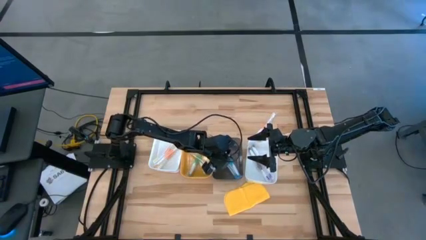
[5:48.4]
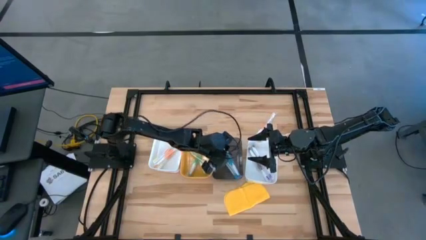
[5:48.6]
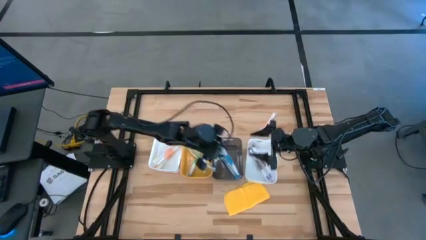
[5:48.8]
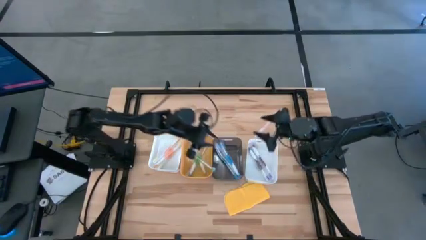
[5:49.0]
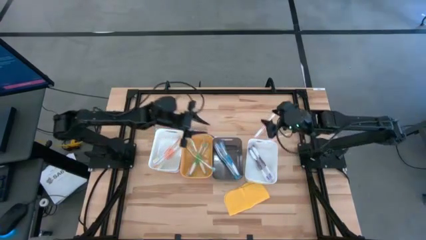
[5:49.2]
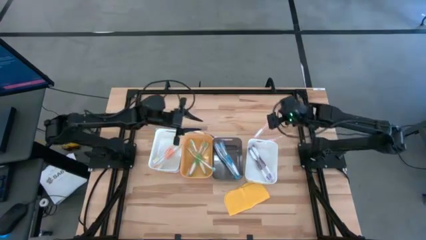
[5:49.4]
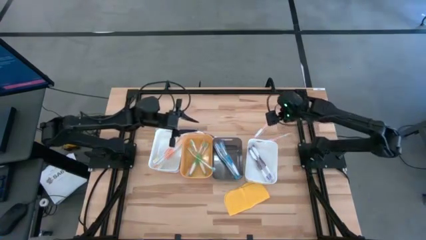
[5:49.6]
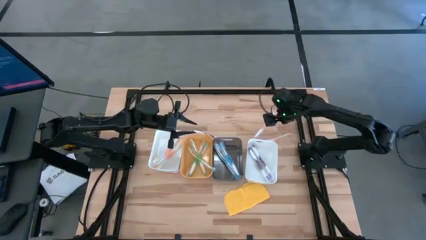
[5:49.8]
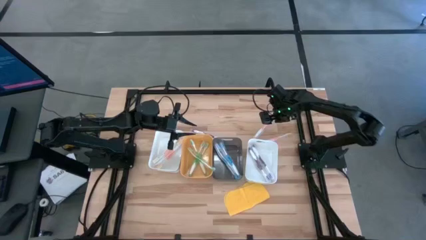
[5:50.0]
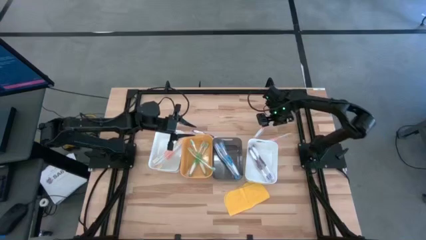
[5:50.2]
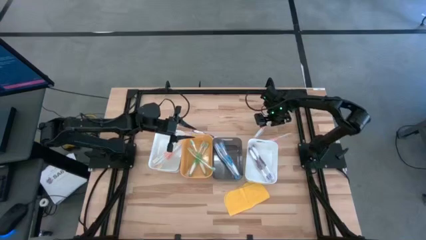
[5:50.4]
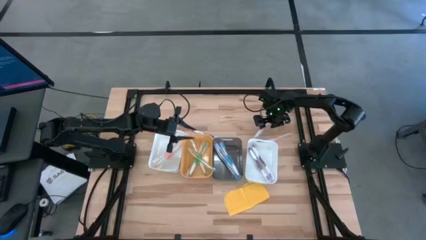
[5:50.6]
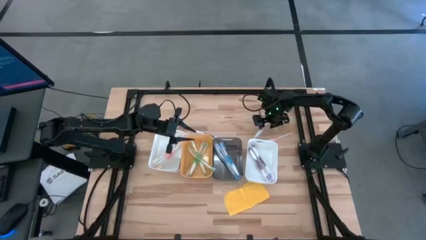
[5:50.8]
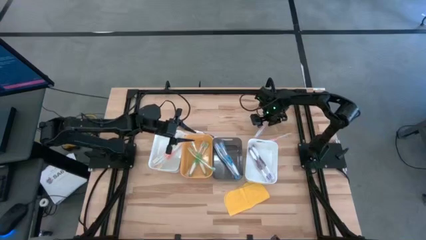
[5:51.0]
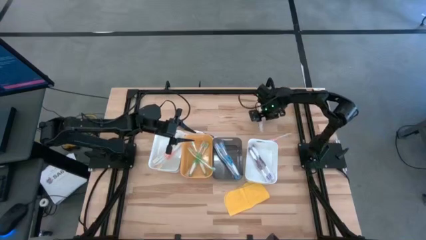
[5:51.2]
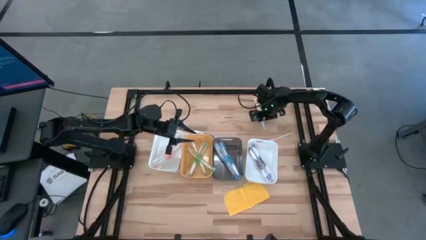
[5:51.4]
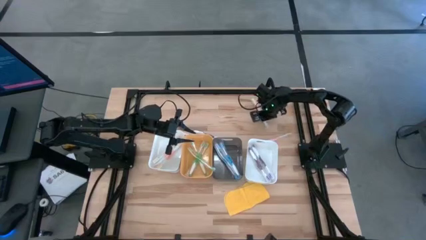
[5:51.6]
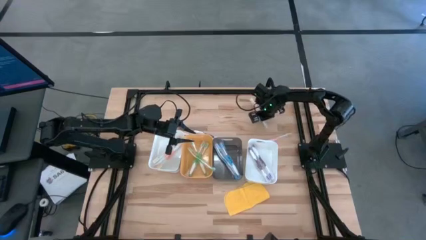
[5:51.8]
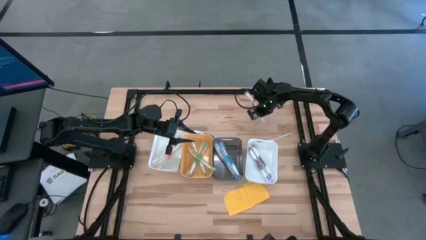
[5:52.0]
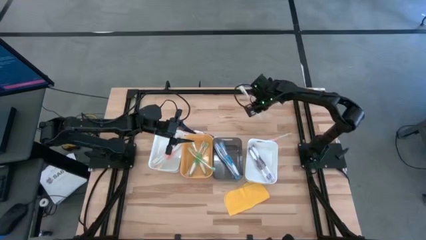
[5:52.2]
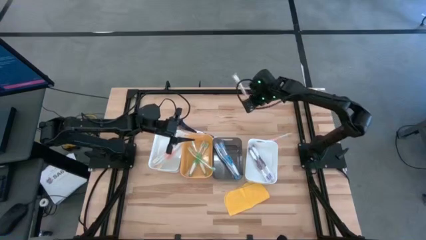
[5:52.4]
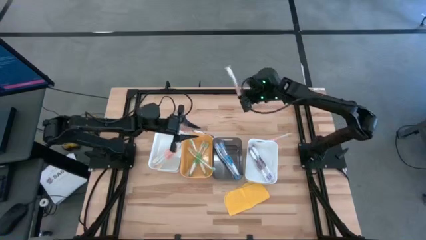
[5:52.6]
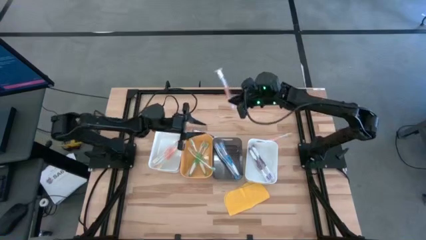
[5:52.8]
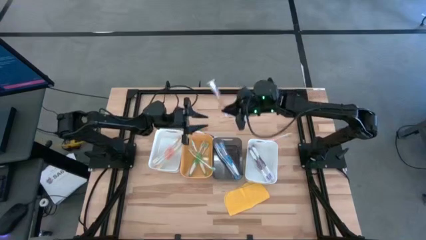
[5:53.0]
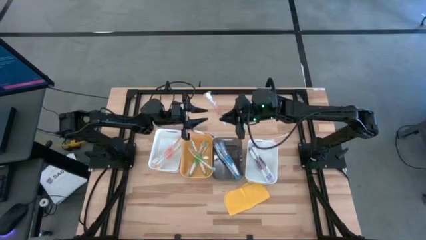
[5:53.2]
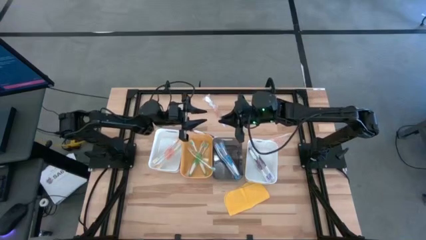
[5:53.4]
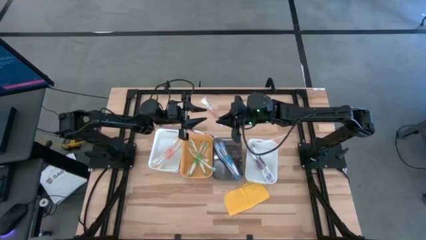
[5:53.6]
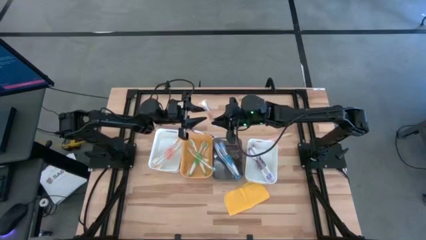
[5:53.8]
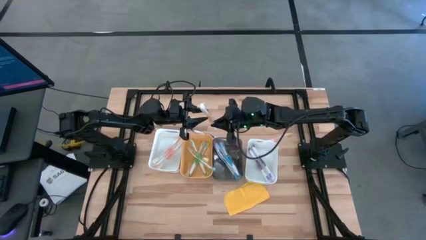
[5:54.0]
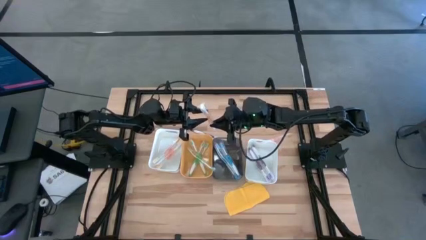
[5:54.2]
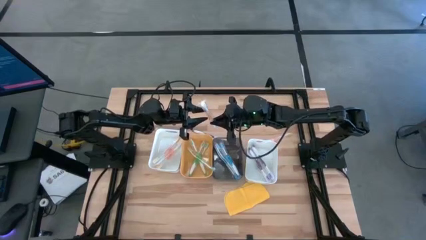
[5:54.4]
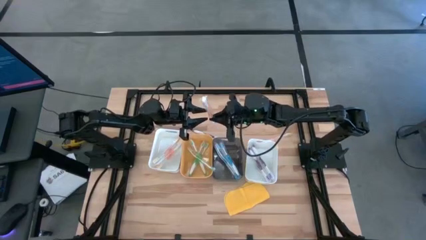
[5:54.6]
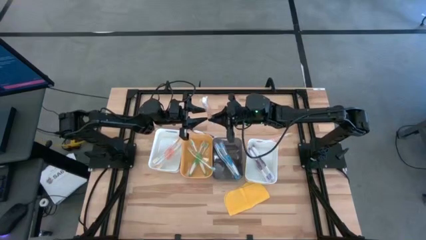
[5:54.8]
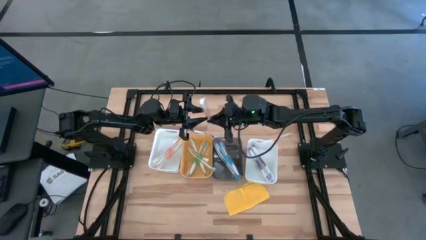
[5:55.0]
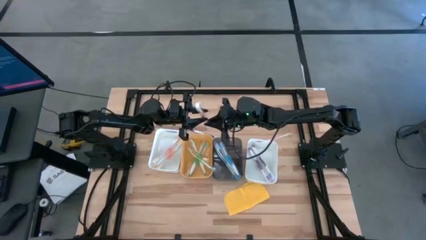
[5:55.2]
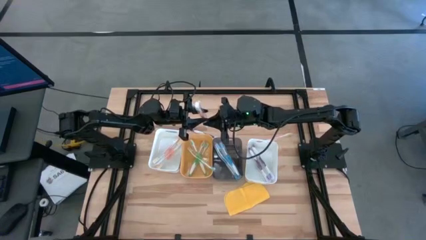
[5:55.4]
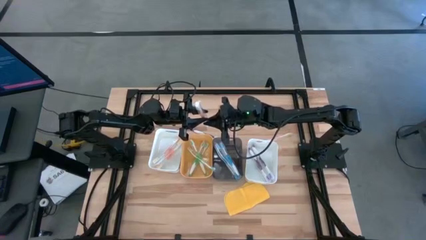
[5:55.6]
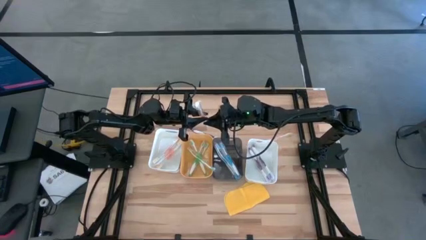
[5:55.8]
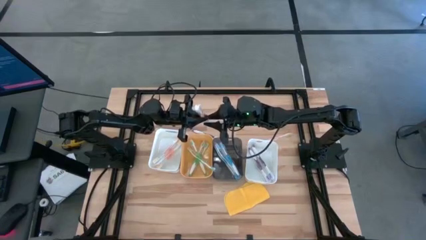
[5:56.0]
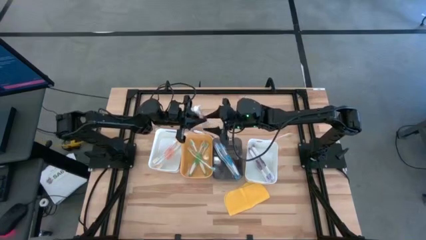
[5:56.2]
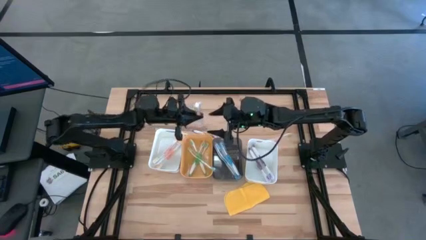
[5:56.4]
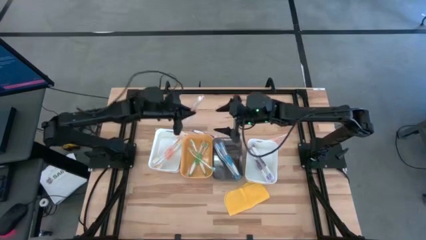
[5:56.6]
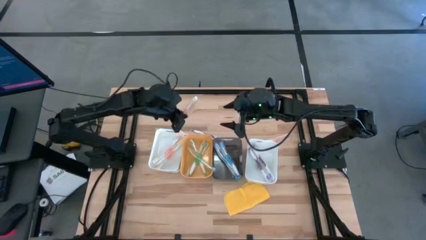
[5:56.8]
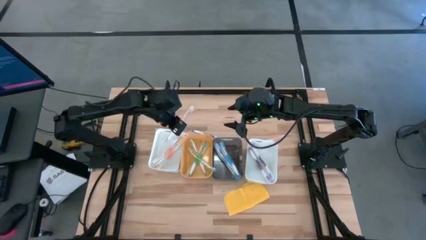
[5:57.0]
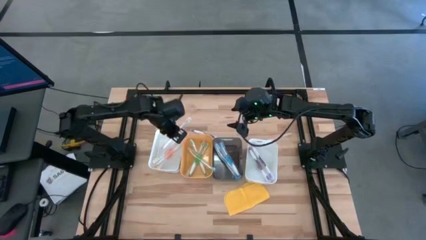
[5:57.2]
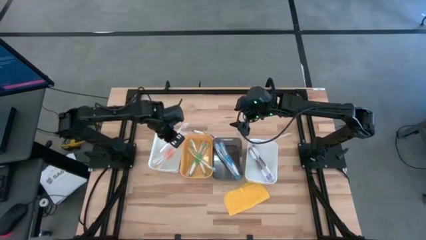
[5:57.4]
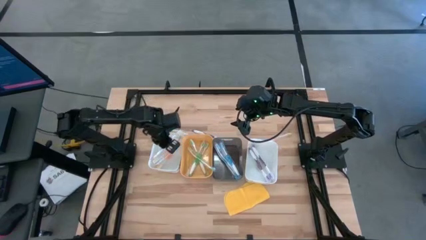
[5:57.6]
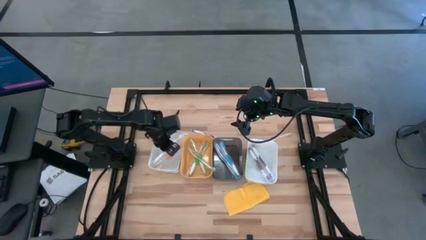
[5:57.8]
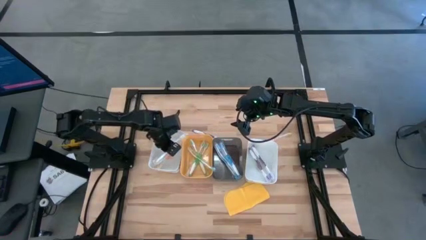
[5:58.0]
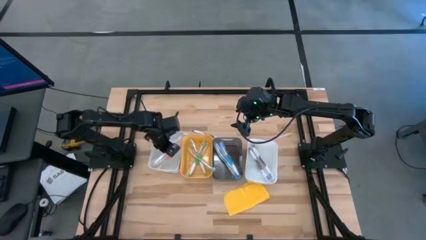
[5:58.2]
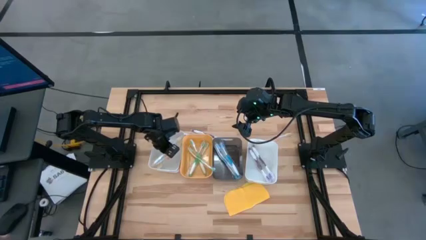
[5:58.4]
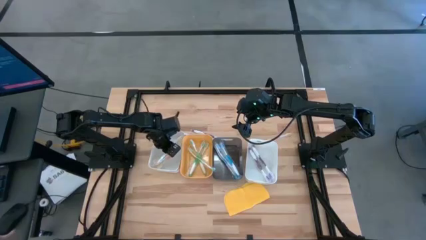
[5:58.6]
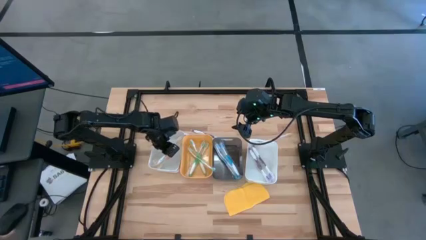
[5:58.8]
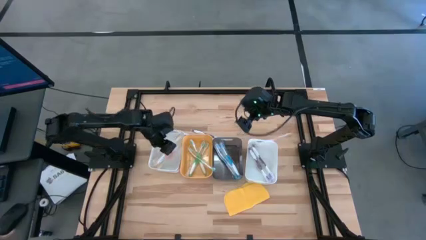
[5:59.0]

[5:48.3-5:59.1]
Task: Pick & Place Toothbrushes
Put the orange toothbrush into the left white bin

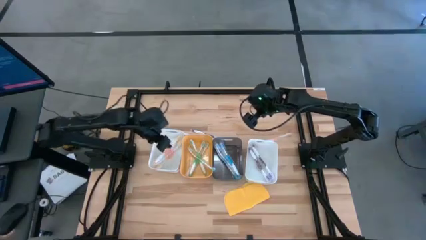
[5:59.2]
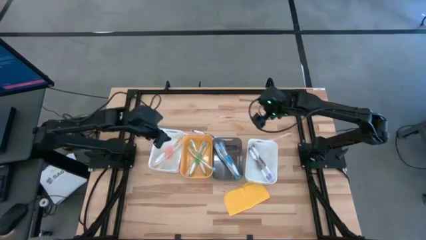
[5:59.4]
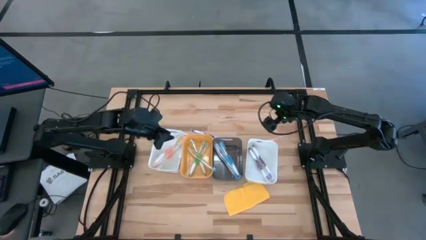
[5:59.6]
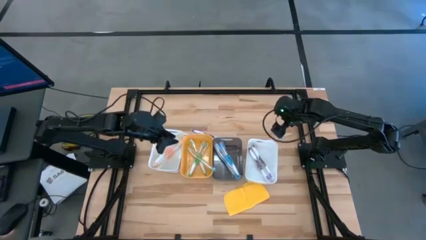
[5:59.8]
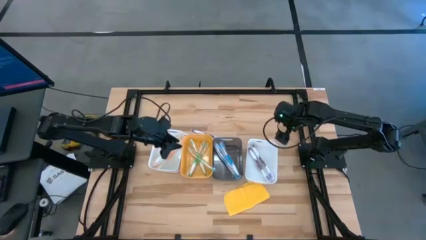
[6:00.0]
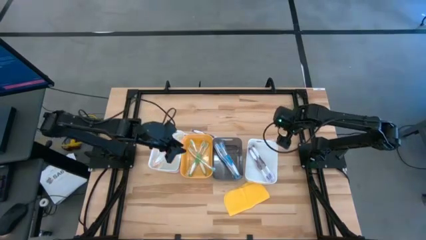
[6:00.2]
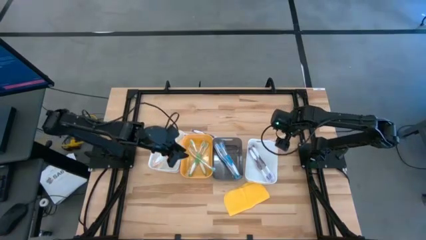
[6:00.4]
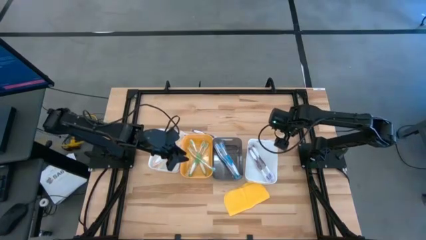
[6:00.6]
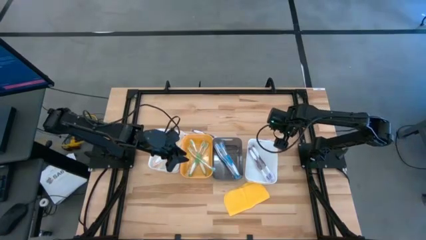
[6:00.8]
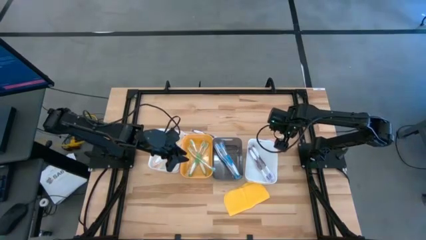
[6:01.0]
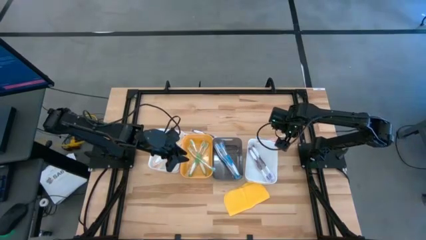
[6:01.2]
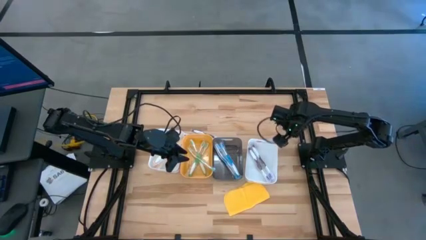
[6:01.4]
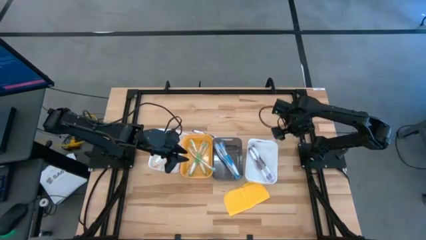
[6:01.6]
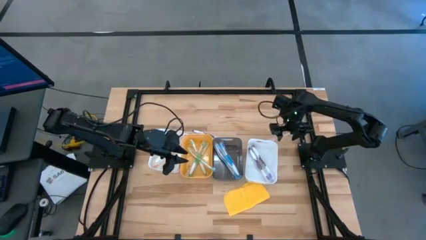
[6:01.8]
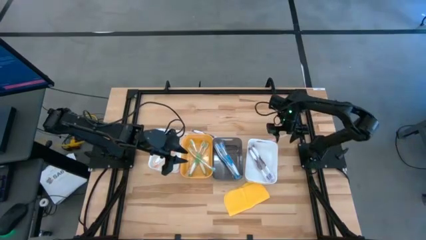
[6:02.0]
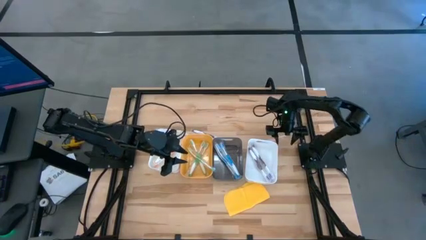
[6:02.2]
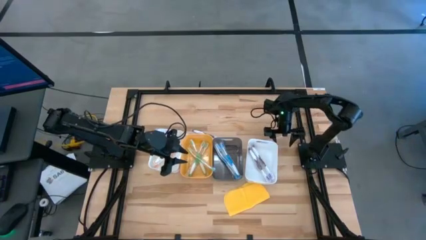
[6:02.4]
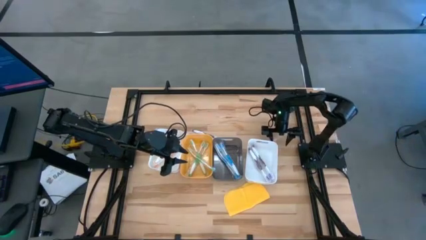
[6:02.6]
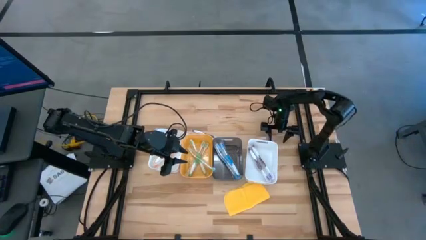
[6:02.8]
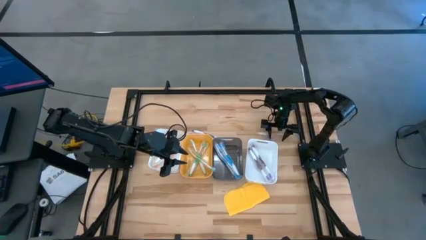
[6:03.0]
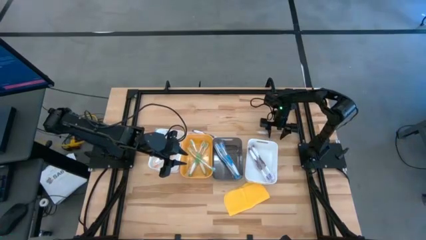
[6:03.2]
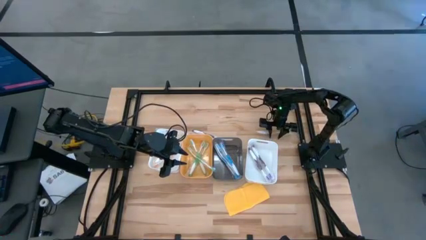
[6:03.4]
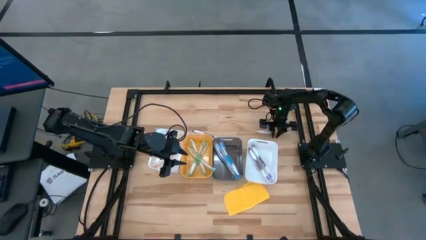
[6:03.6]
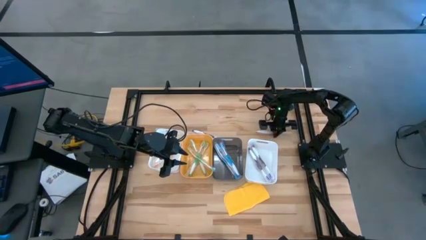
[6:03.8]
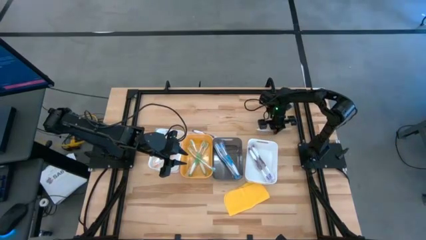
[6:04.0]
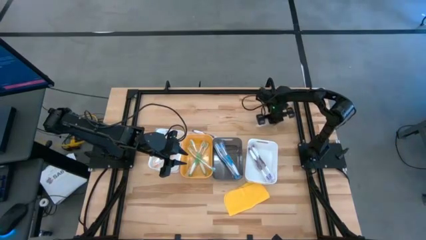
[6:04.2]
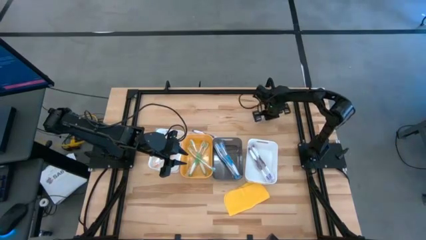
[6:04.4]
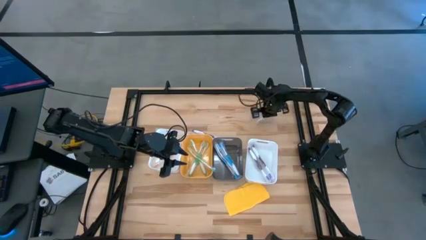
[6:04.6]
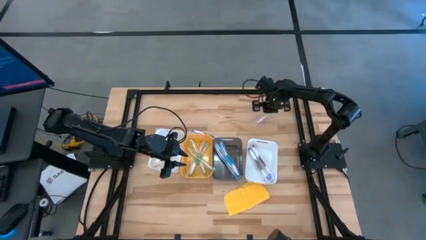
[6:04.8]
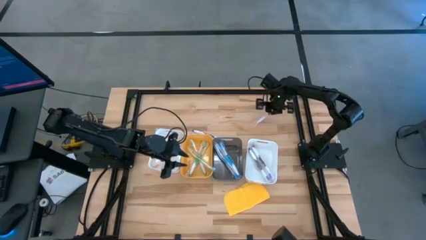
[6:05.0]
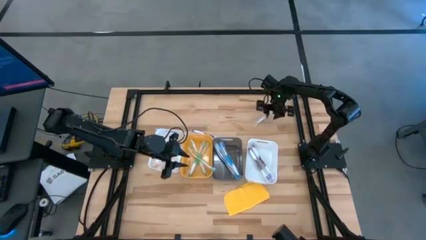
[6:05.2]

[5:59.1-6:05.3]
Put the orange toothbrush into the left white bin
